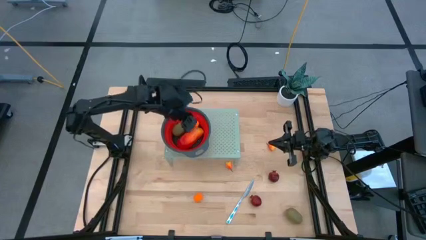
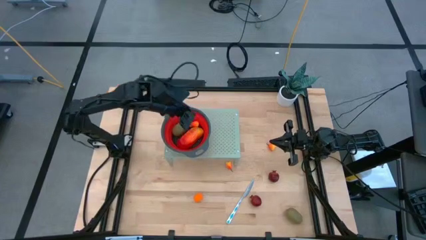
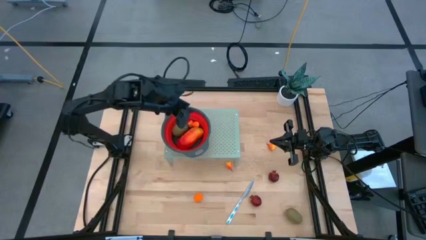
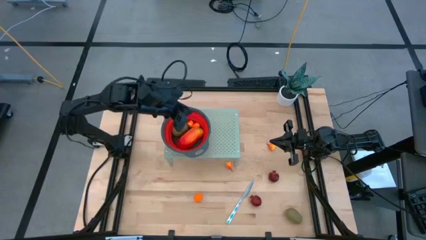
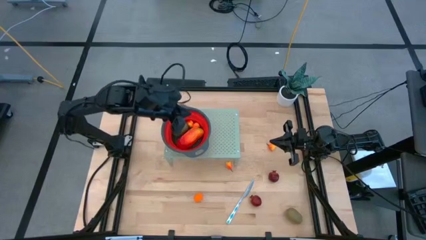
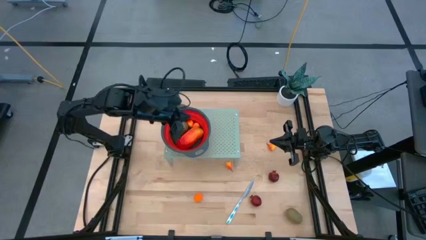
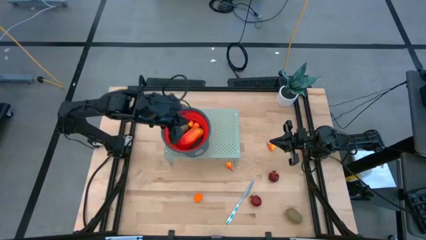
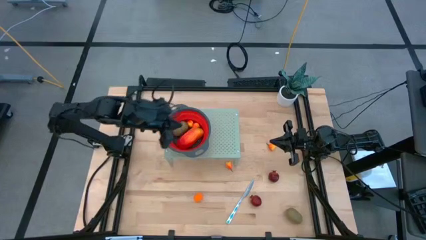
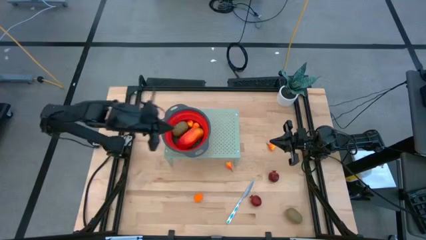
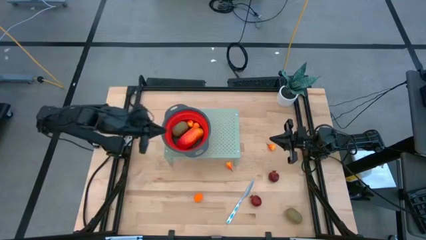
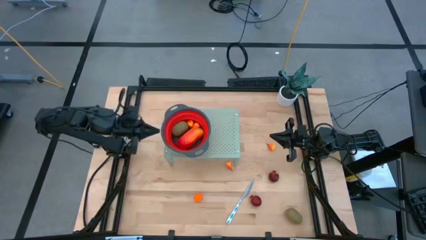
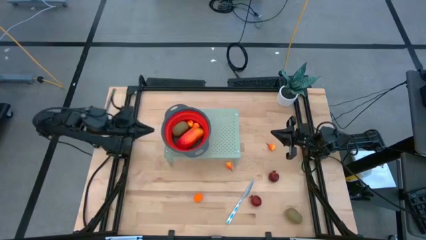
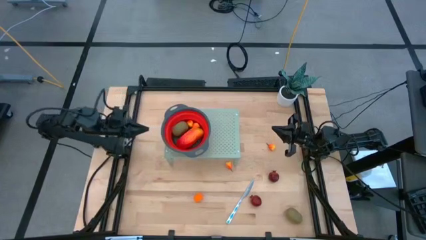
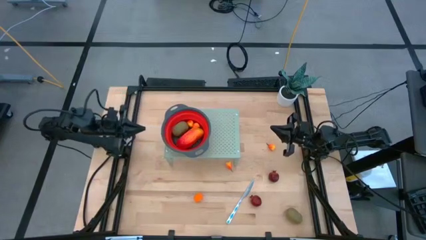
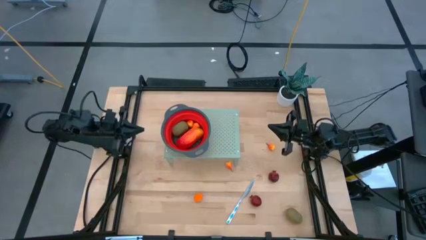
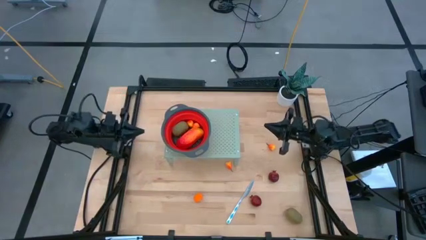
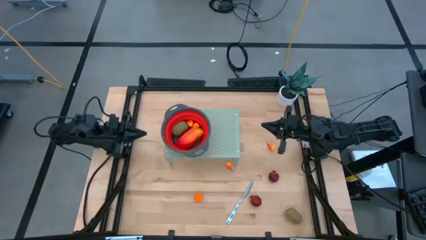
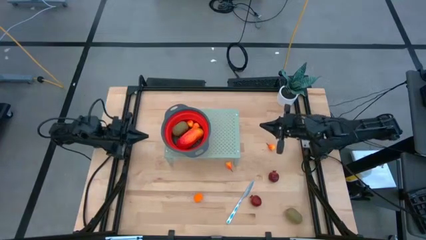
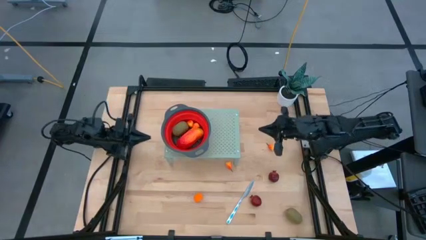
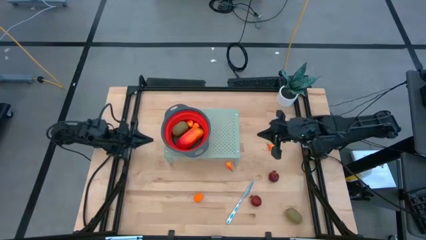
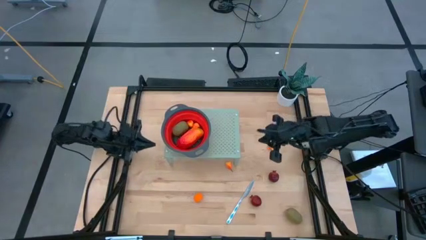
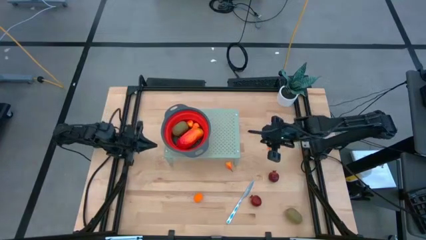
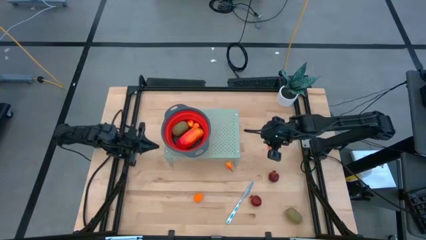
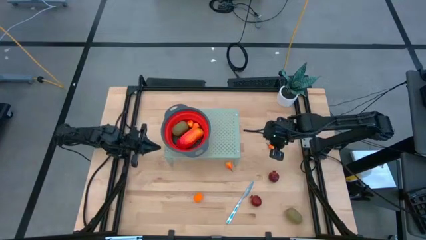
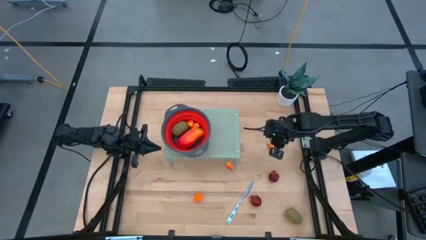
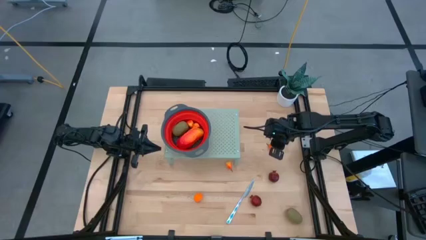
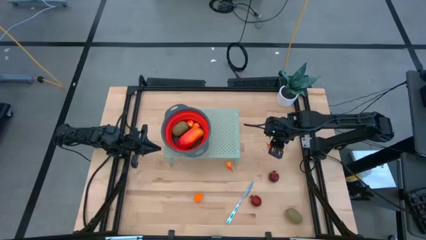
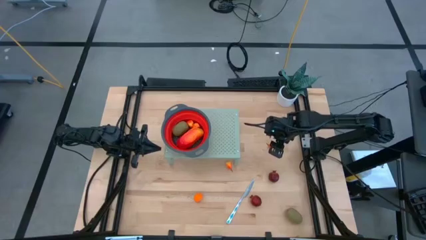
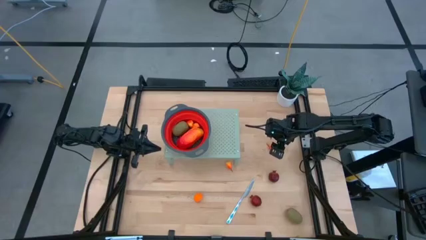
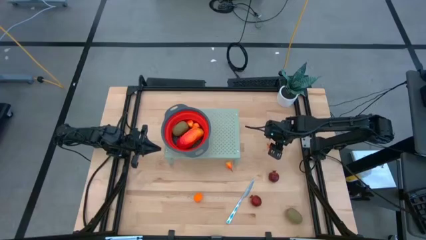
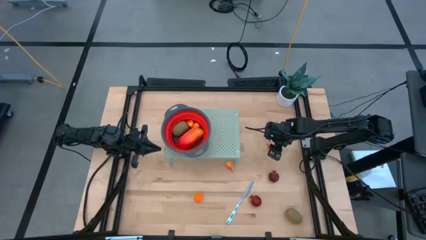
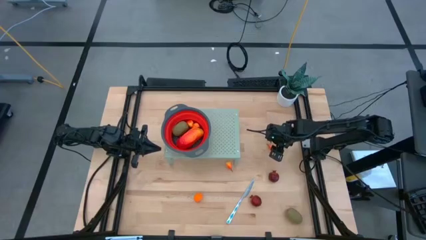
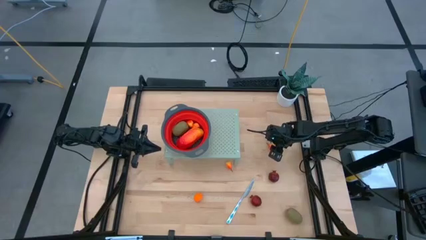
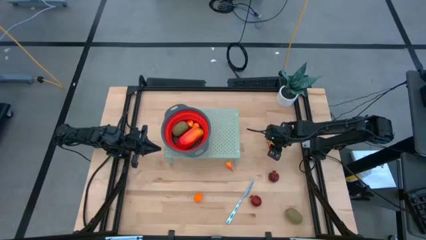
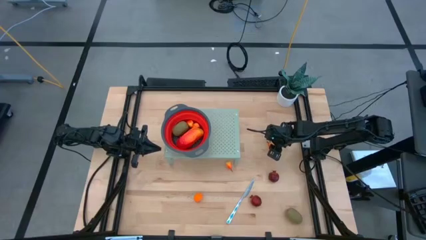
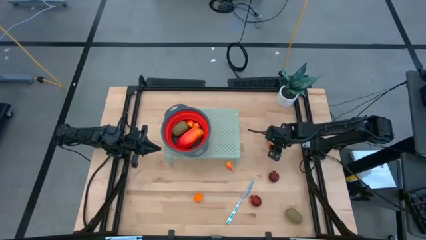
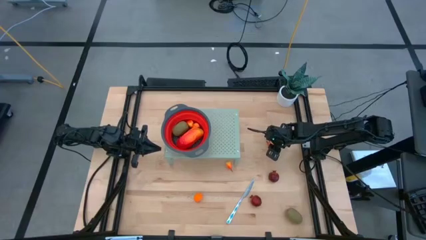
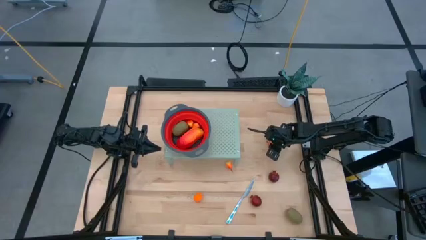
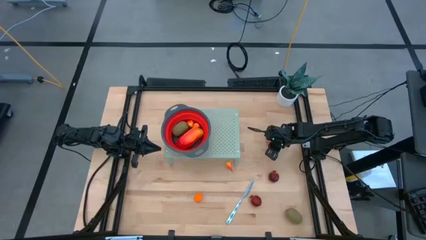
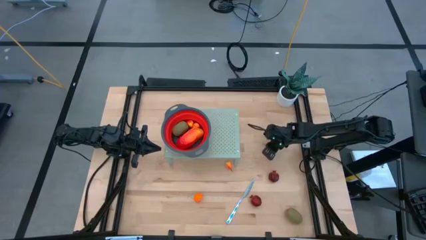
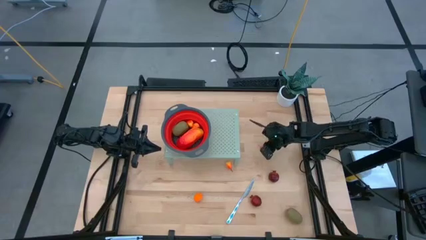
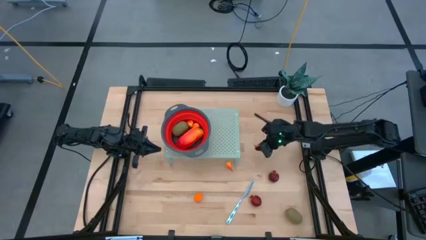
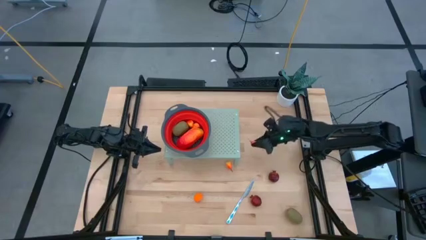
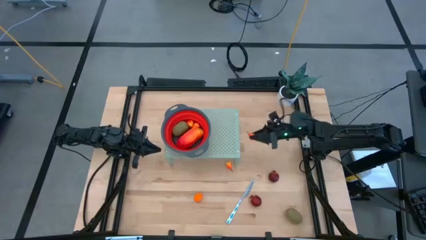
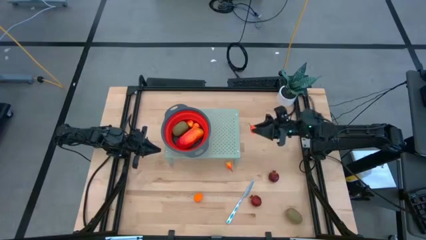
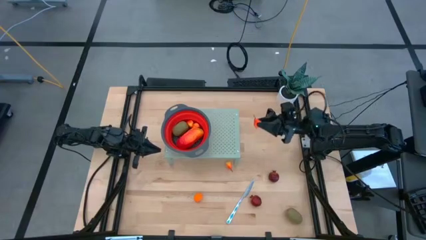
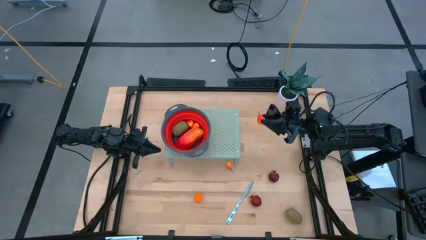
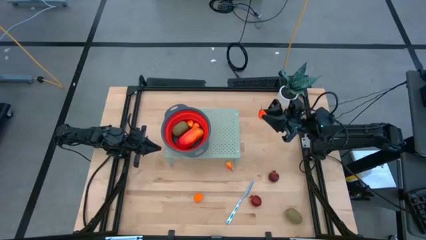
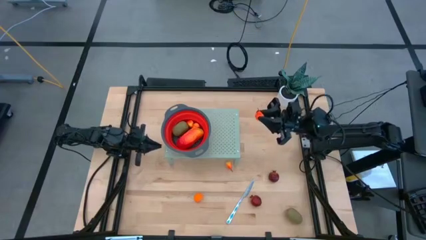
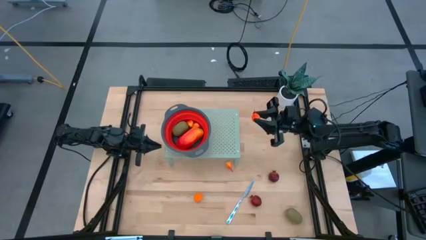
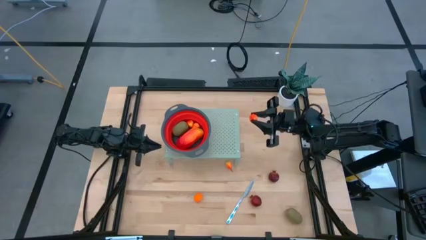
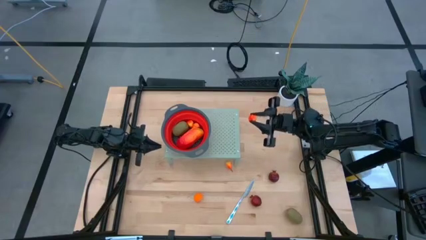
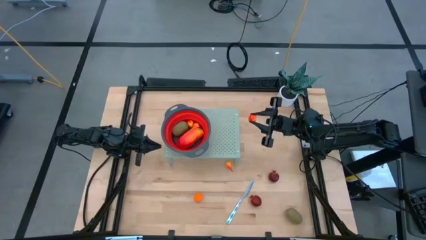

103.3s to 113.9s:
Task: Pick & Place Fruit
Put the orange pear into the red strainer bowl on the shelf

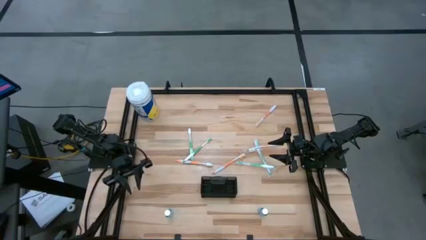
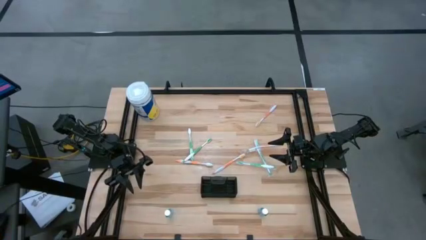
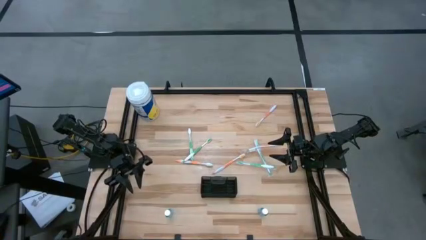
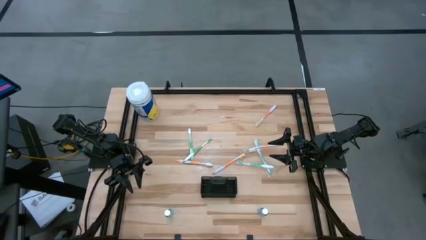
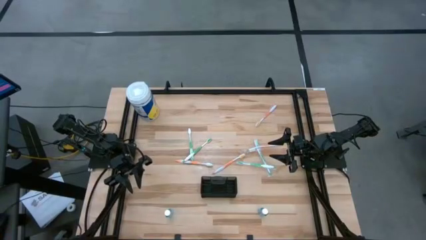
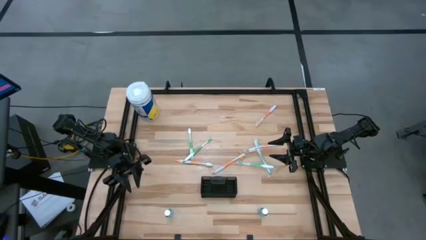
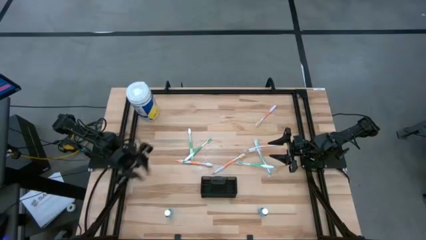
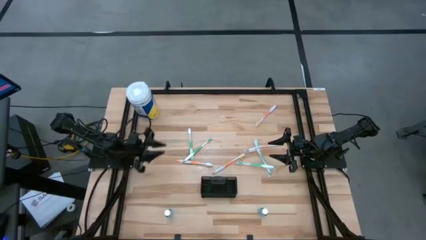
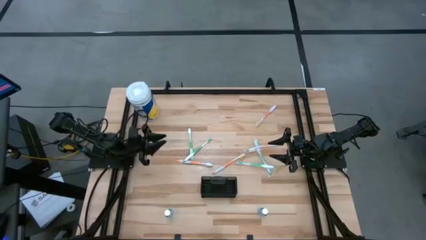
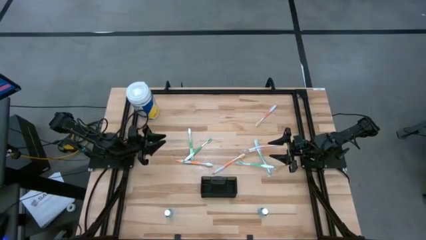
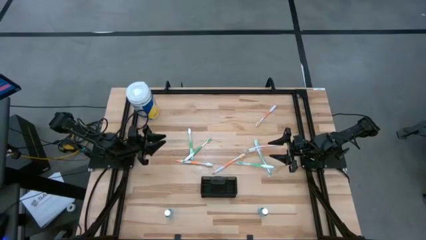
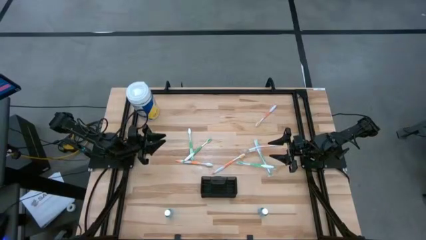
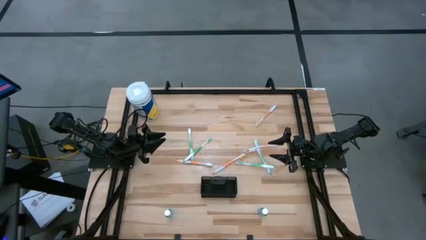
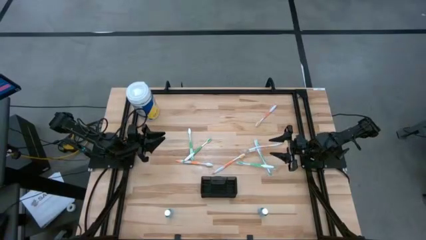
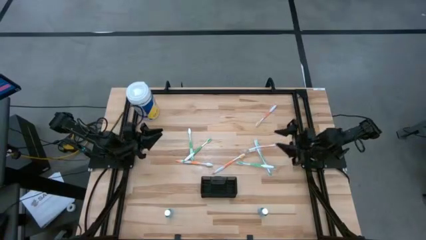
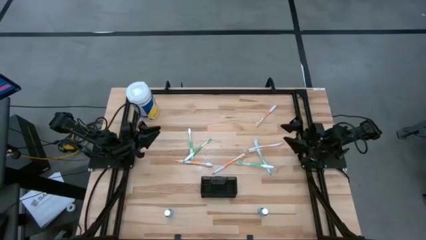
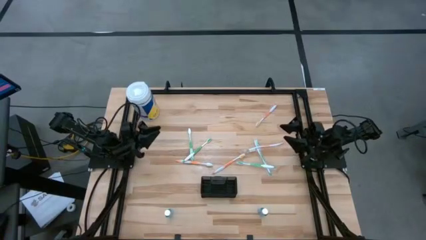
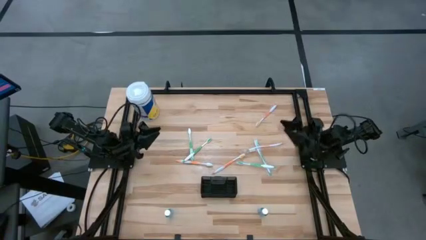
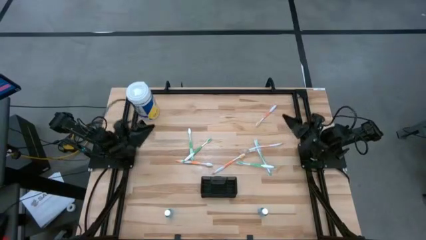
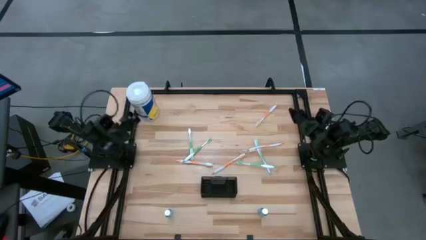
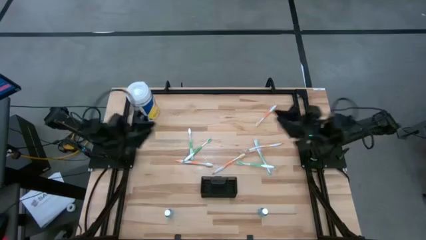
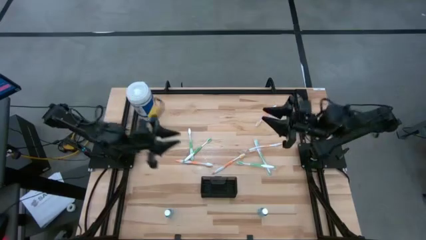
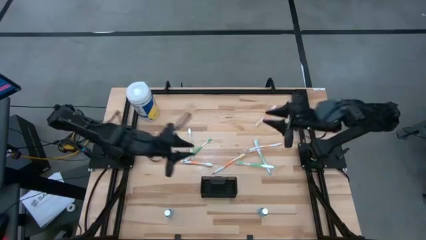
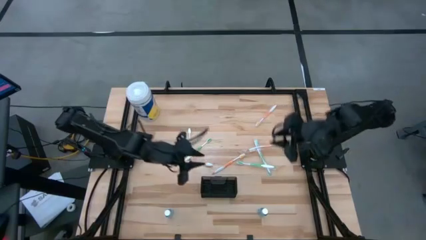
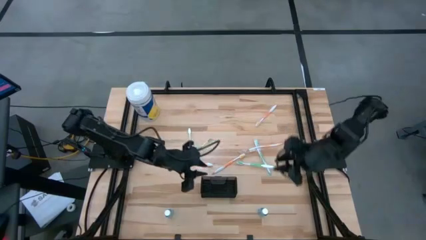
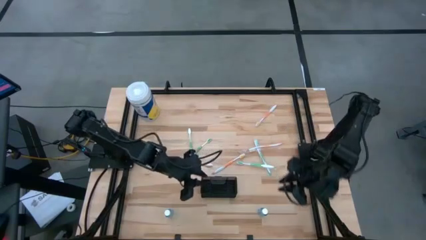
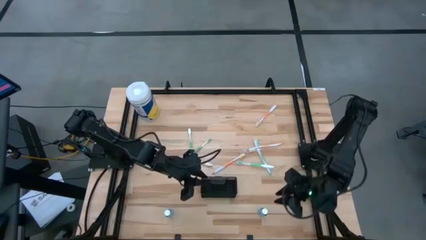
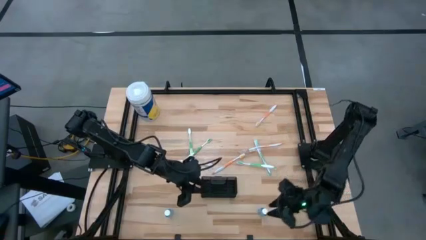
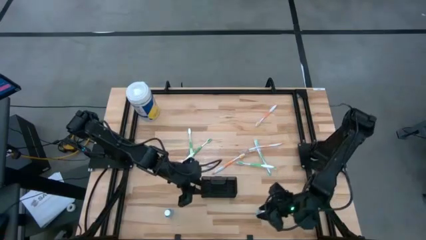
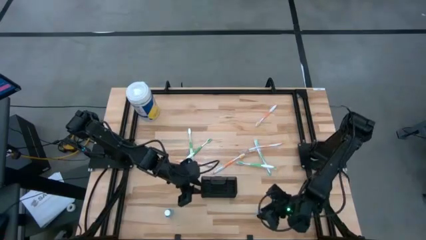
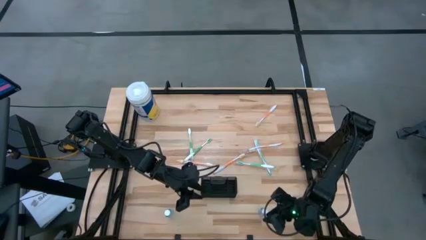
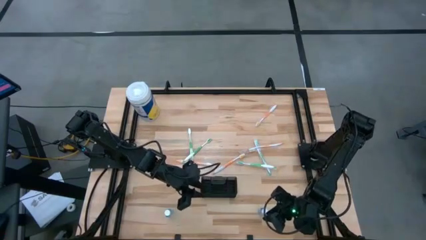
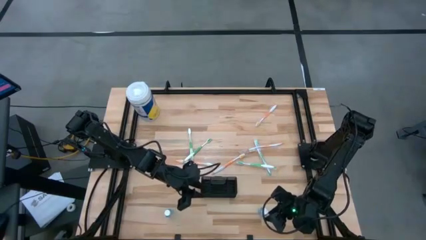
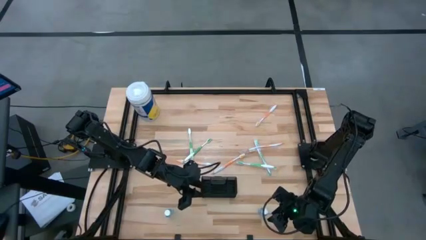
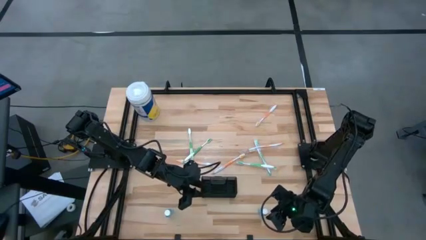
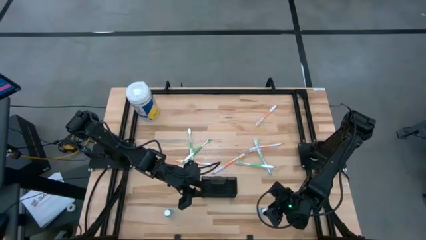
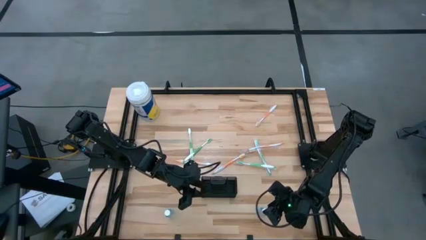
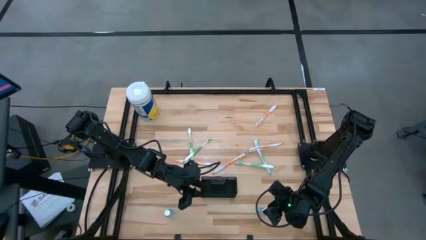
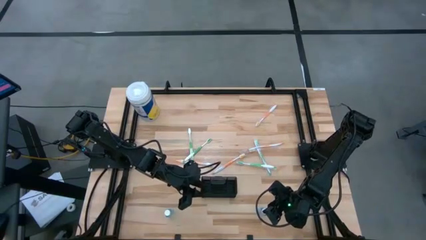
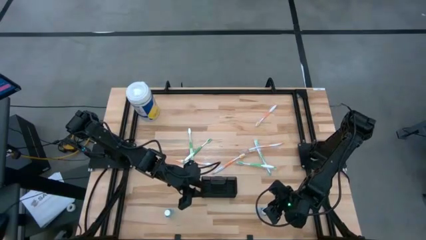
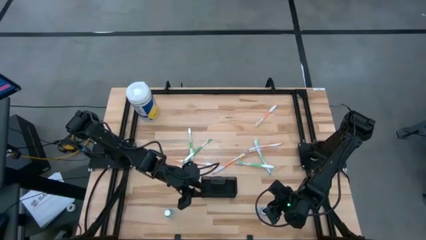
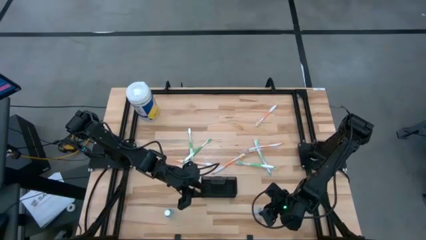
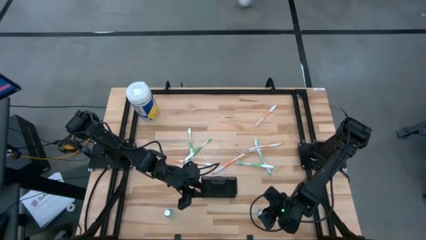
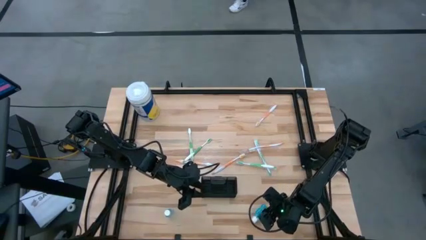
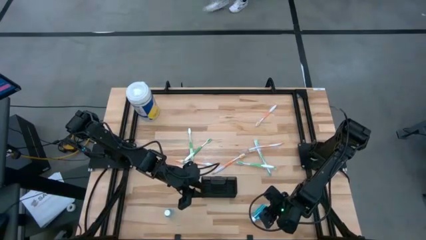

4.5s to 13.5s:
Task: Pick & Place toothbrushing station
Put the blue mouthwash into the black wire organizer
